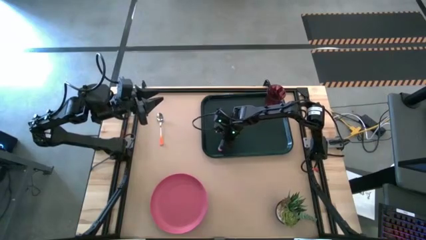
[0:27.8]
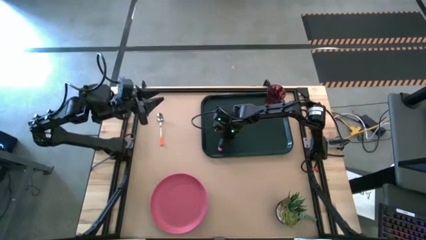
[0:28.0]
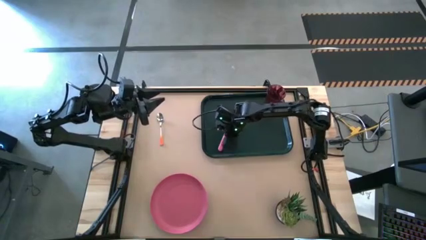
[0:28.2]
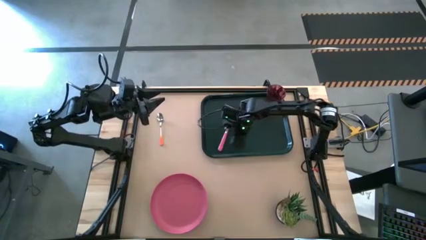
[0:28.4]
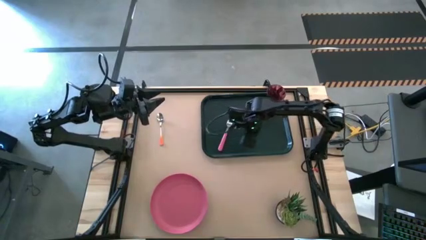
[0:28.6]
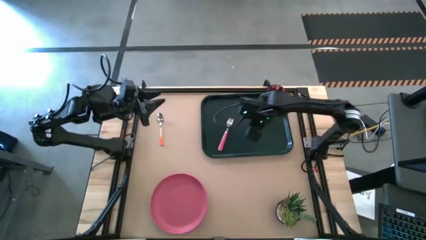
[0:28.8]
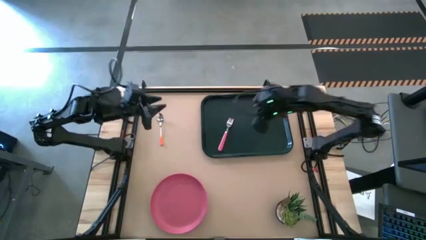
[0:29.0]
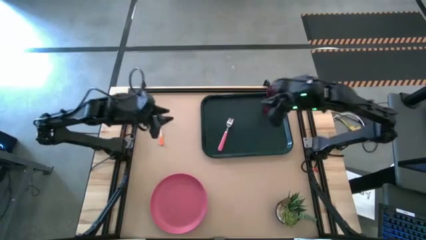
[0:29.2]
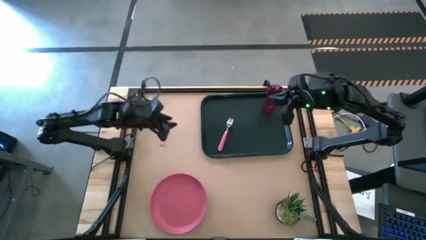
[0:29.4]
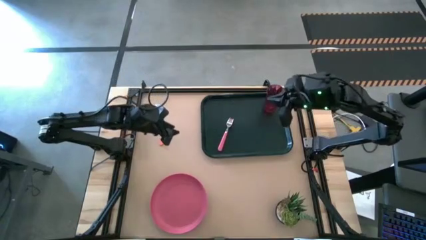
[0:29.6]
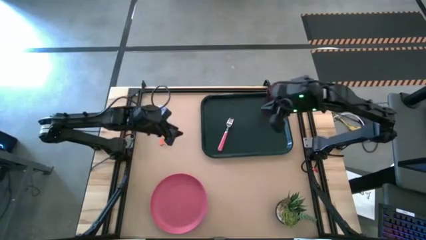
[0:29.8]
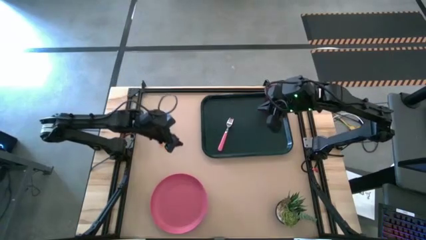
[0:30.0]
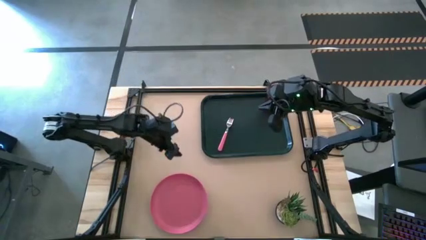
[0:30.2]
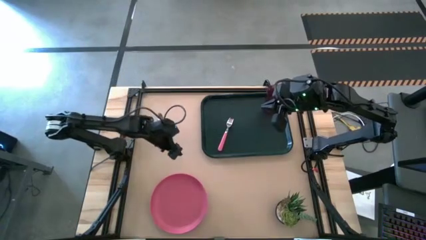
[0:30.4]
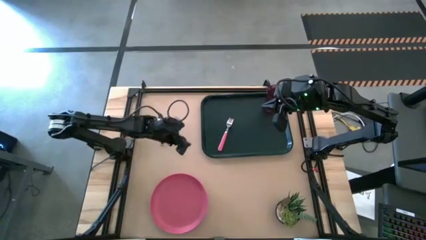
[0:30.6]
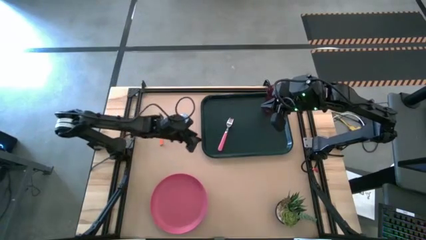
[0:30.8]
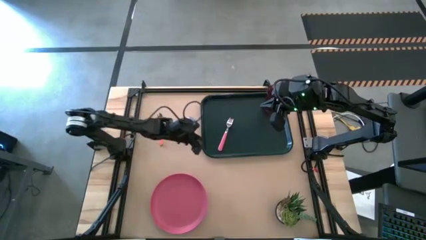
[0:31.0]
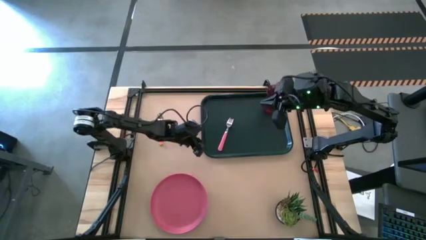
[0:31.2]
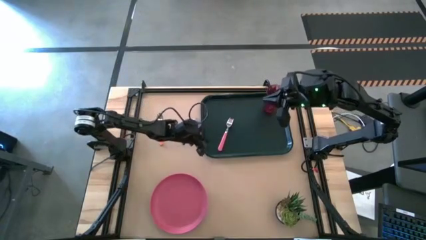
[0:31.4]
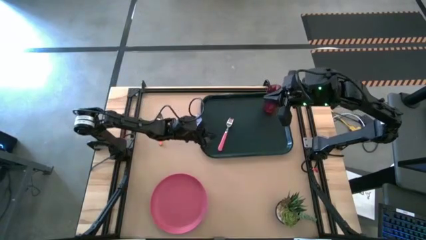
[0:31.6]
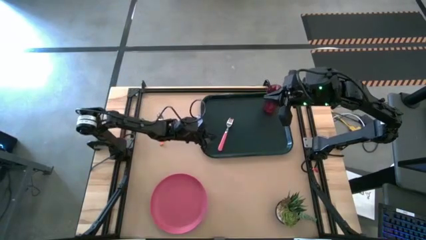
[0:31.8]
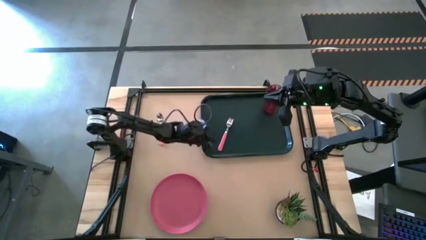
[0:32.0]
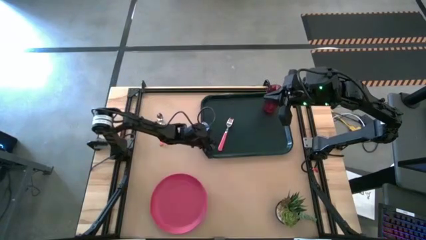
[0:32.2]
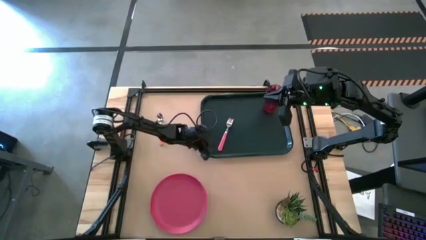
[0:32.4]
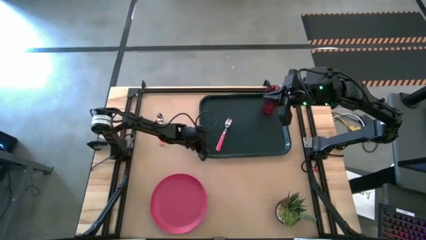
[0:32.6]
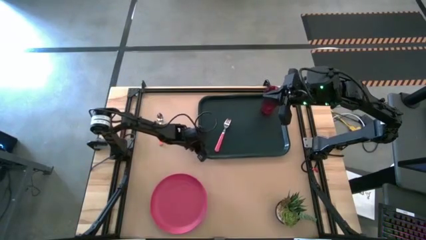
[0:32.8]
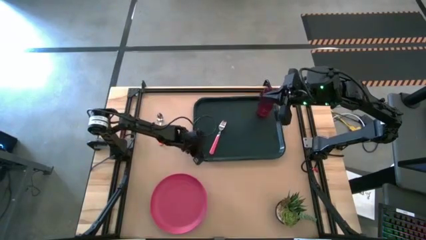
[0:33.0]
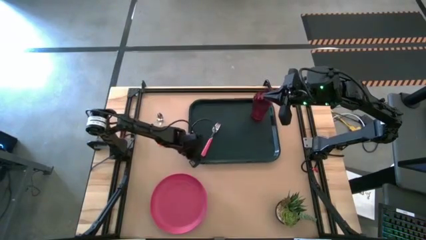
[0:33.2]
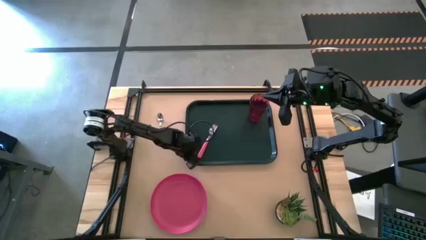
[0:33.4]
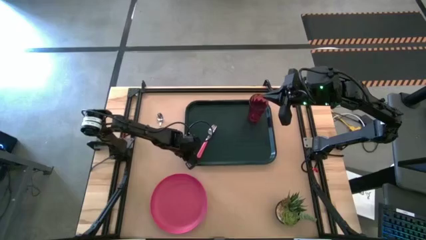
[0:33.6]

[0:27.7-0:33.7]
Task: Pick and place plate/cup/fork/spoon on tray
Adjust the black serving tray on the table

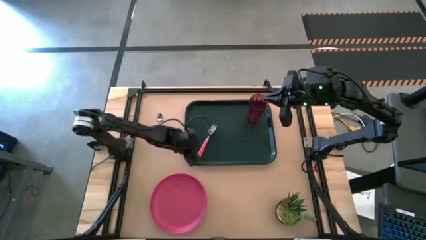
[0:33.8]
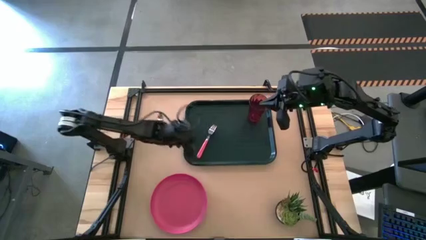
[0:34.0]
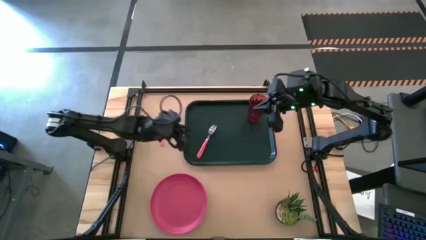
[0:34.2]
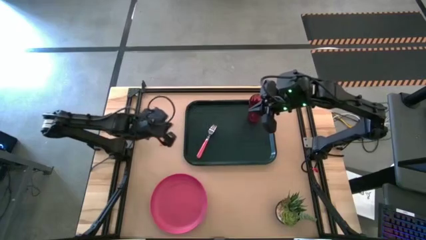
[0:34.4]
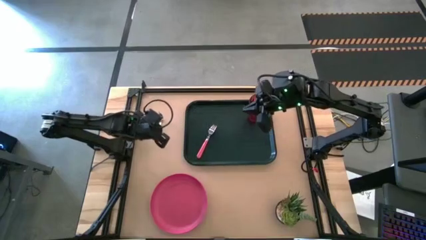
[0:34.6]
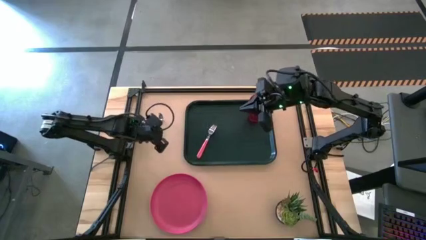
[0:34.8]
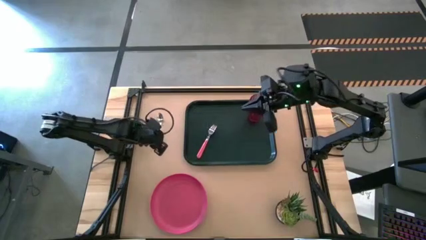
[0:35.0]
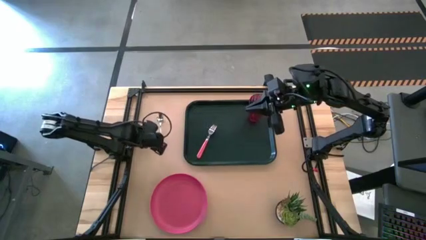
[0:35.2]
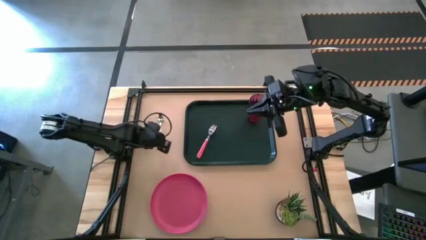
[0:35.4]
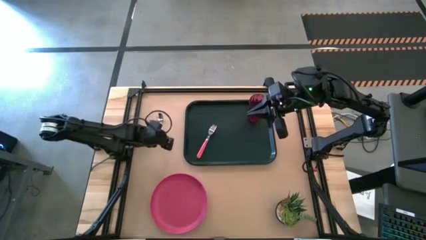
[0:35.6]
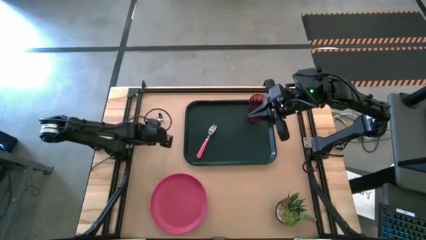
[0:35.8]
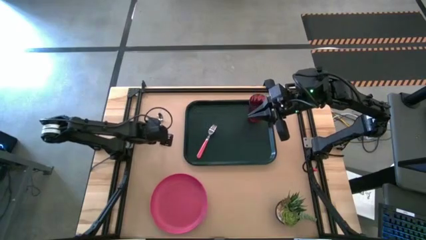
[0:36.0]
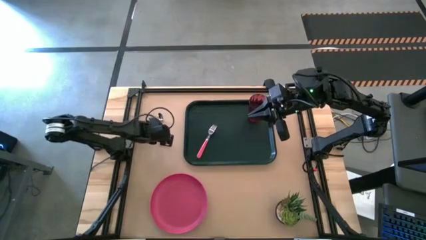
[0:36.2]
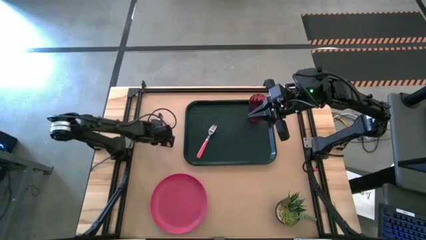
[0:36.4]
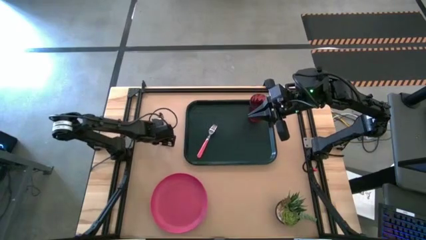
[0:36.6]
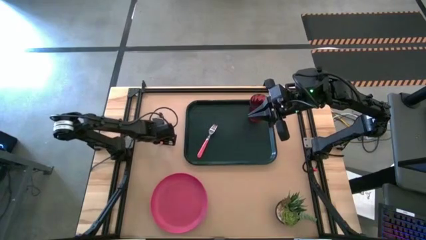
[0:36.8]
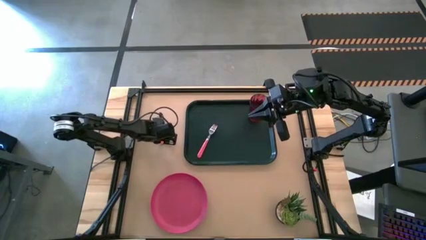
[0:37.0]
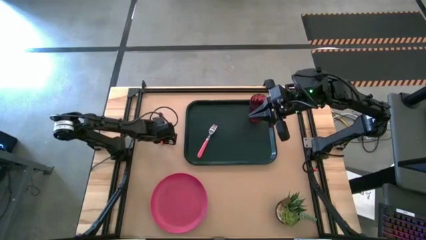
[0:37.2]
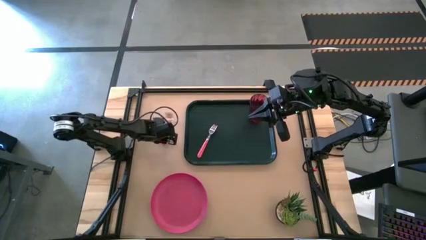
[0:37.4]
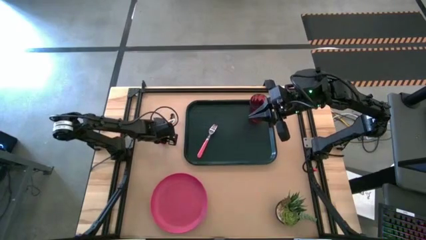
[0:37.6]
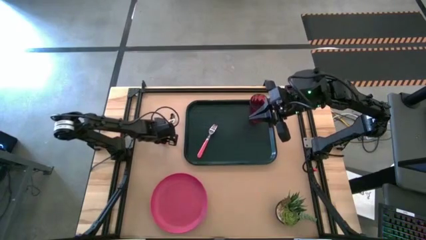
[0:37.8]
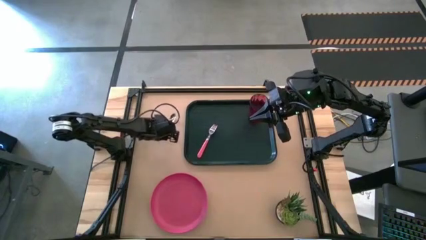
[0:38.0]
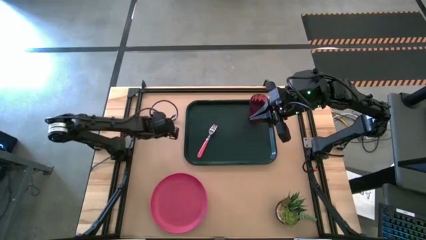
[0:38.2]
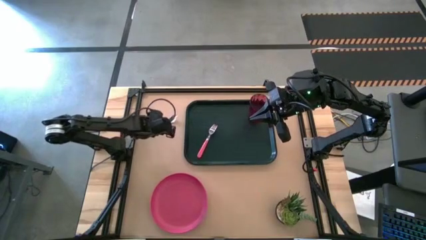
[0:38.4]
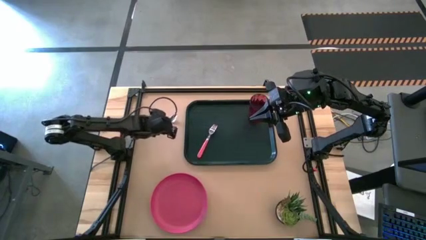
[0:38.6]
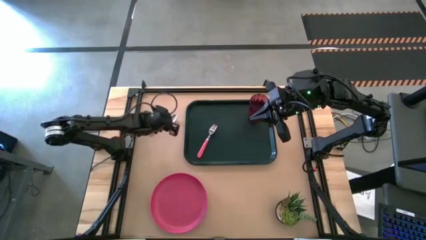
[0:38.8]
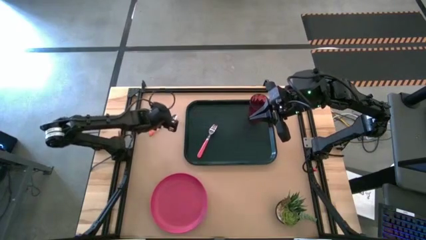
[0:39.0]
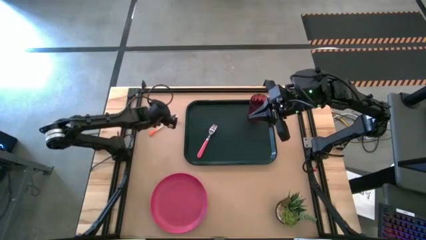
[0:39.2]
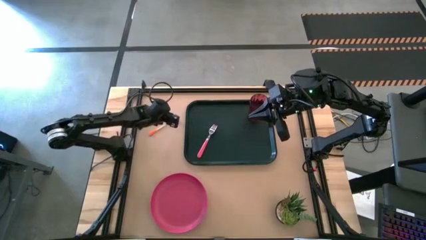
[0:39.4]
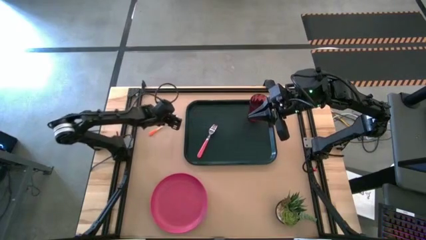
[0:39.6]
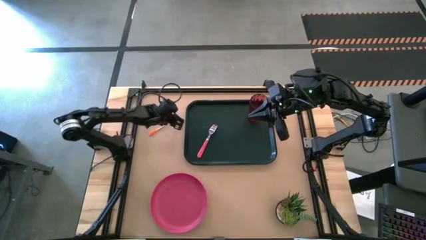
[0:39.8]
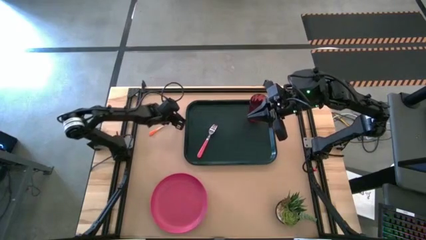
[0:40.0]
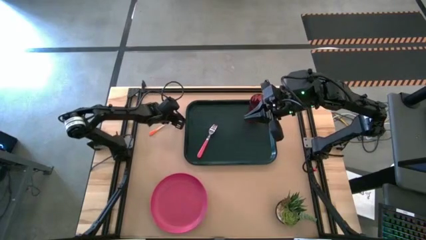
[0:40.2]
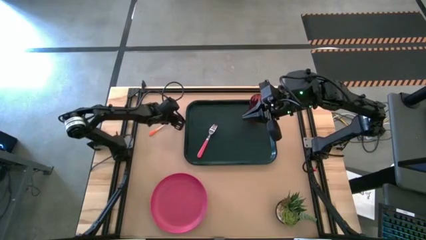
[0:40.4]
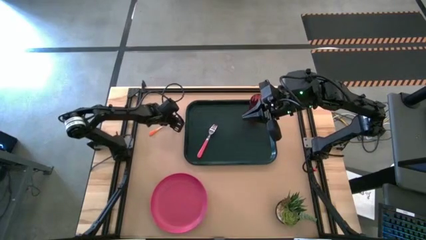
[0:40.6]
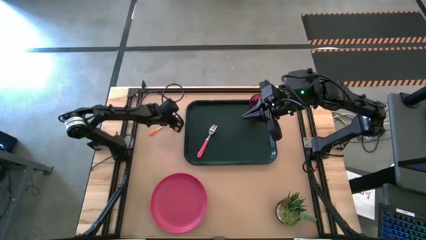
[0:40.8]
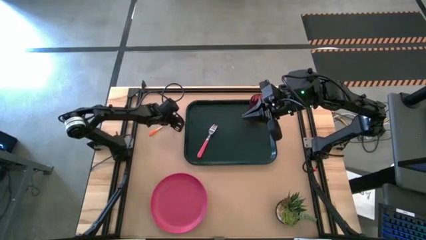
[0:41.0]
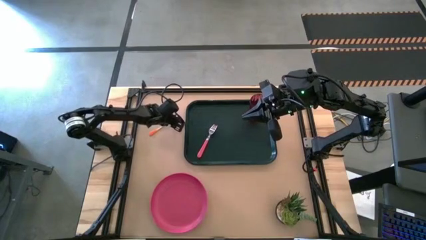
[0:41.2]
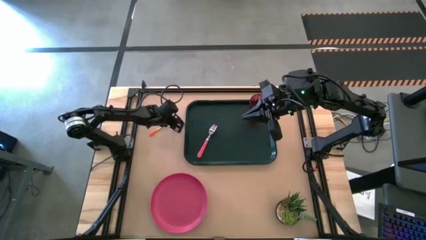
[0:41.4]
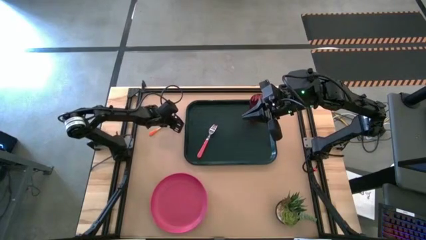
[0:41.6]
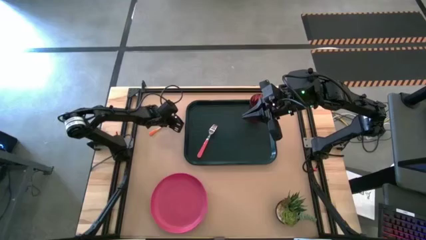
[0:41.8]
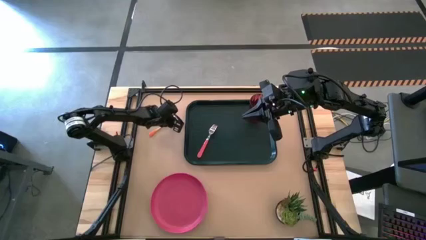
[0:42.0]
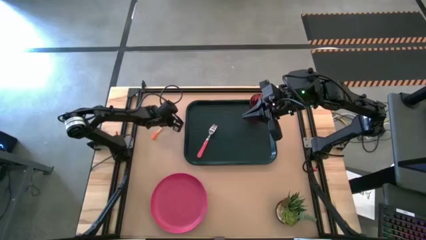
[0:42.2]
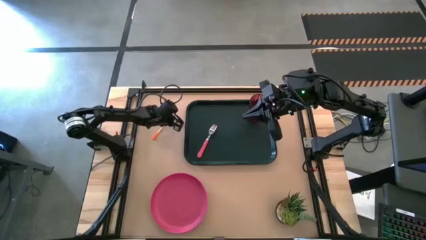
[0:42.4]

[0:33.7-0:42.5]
Put the orange spoon on the black serving tray to the left of the pink fork
